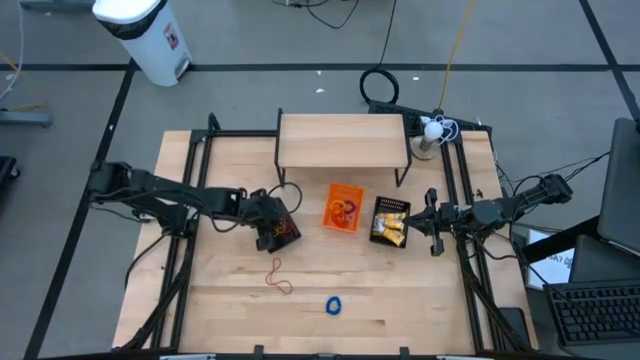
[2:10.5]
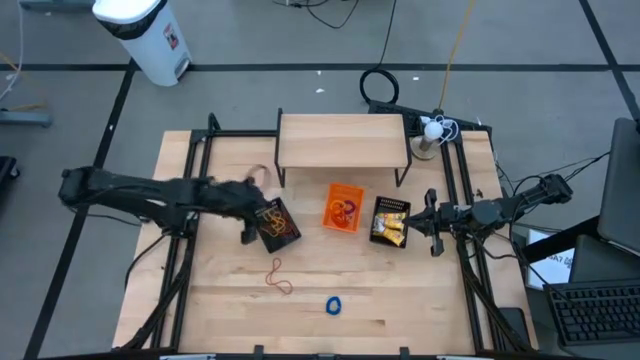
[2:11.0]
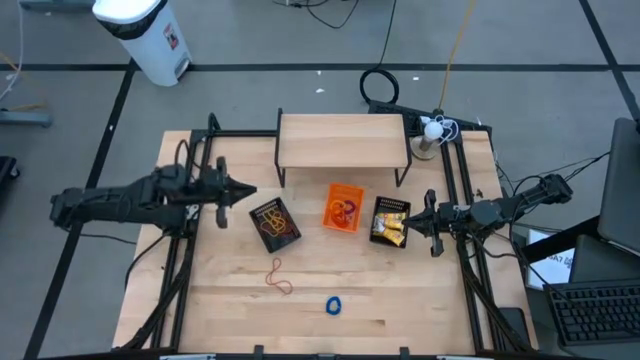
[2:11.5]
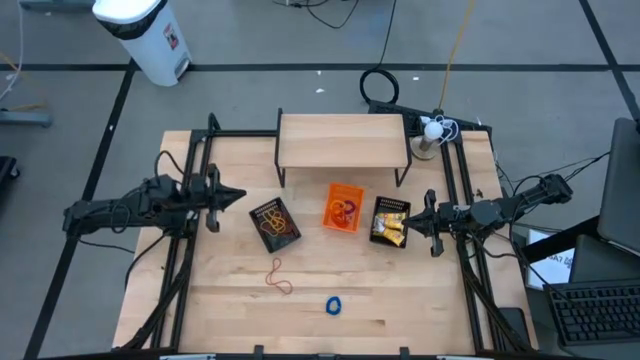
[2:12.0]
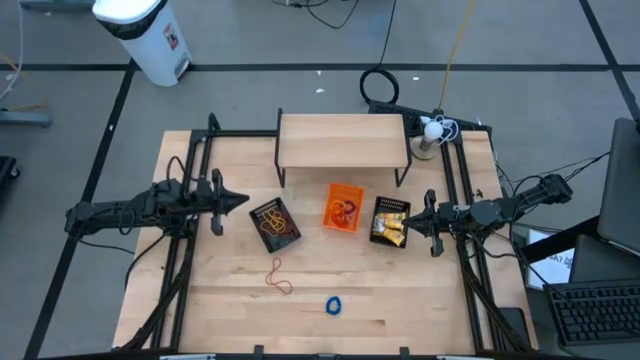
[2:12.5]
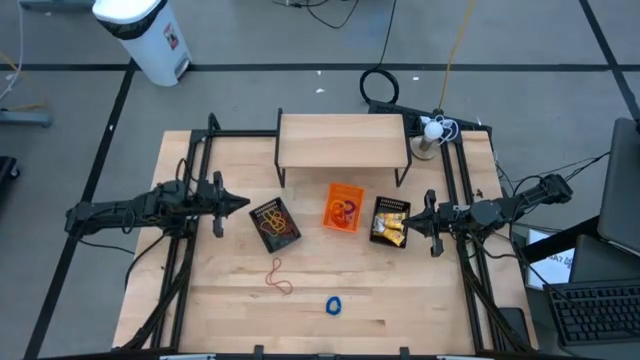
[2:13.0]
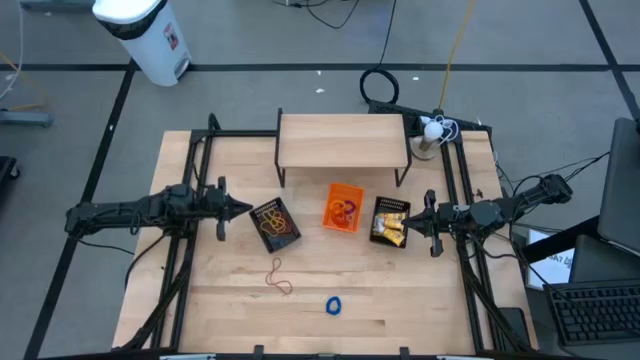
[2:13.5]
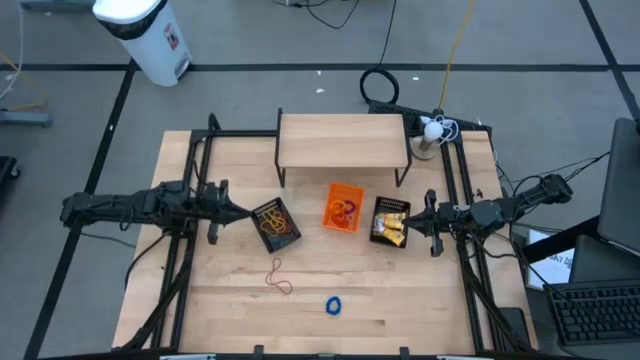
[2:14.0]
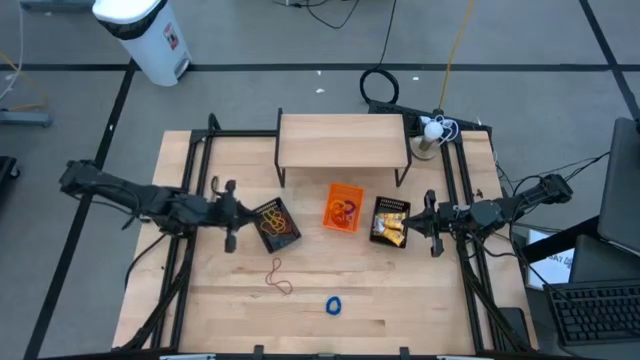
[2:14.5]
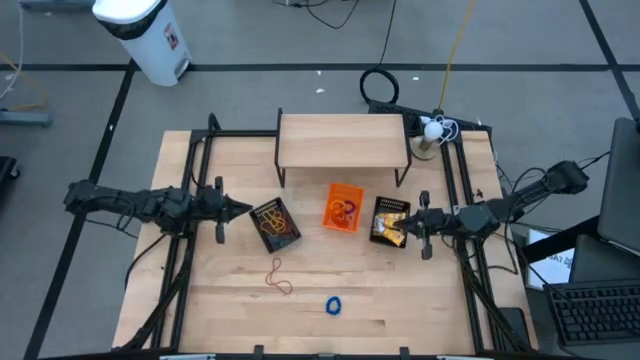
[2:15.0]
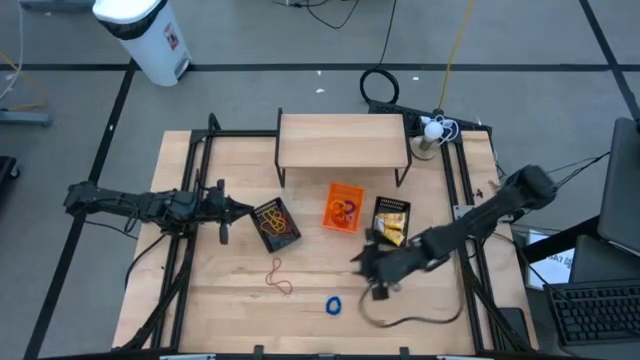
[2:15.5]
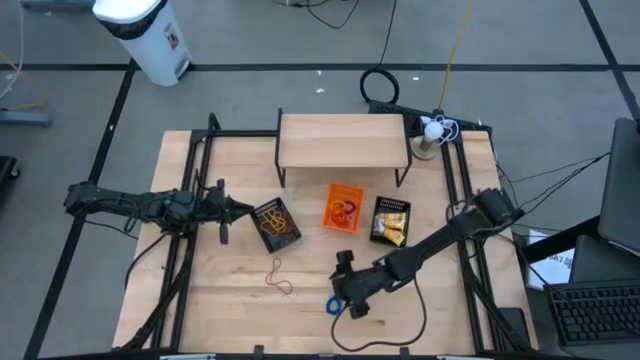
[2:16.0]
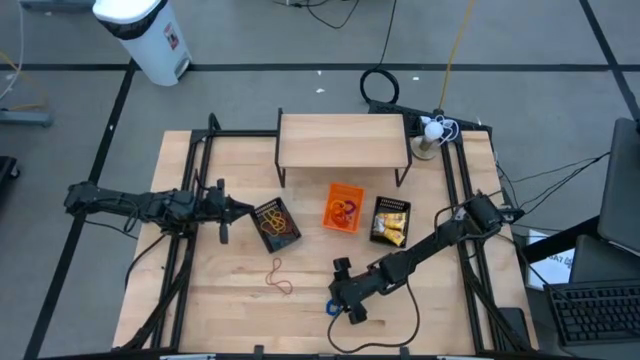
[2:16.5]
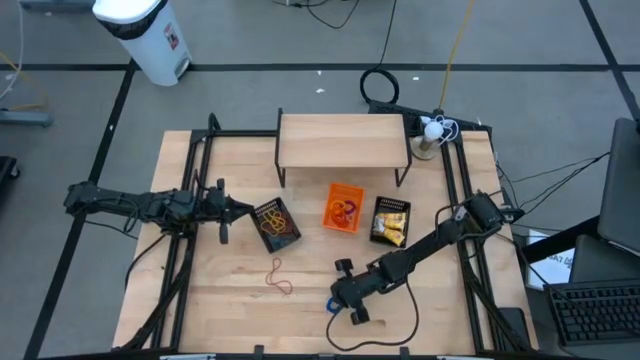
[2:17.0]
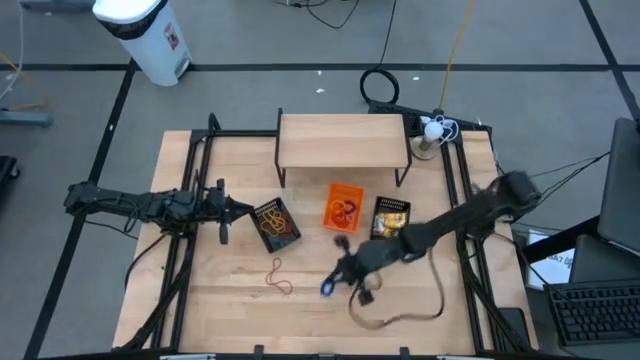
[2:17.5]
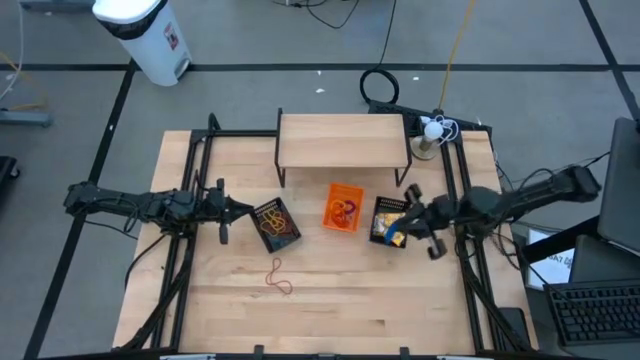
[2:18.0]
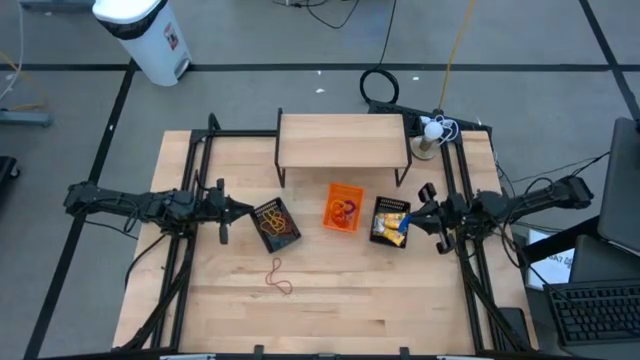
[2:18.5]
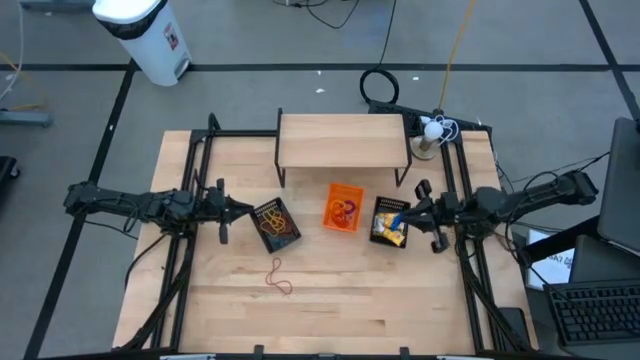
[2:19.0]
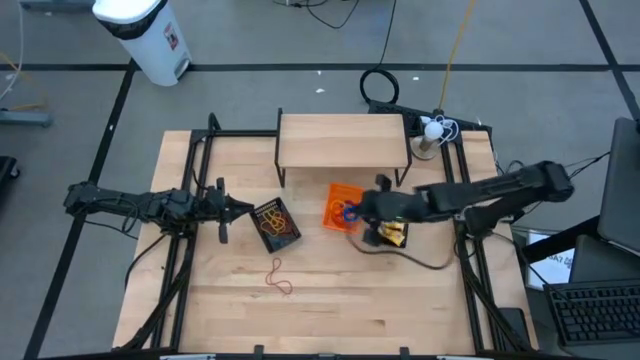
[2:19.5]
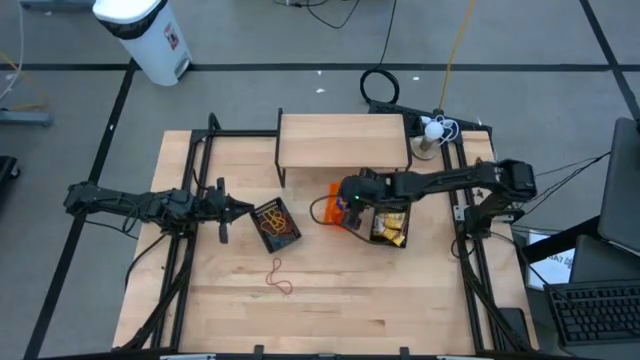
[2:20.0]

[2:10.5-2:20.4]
Task: Pick & Place Office Desk Supplies
Put the blue spring keychain into the orange bin

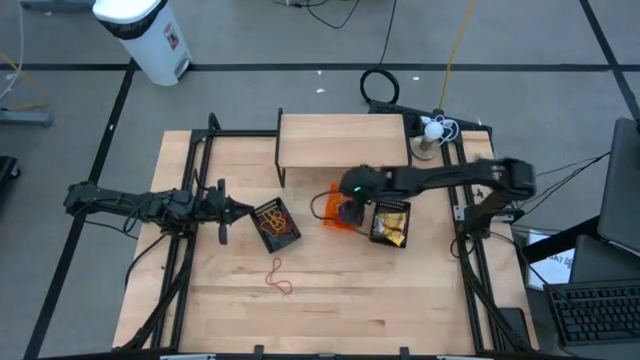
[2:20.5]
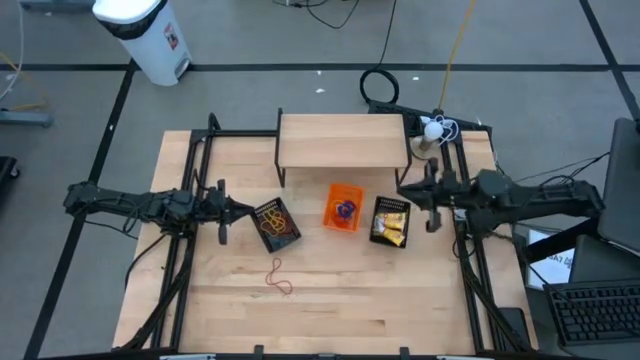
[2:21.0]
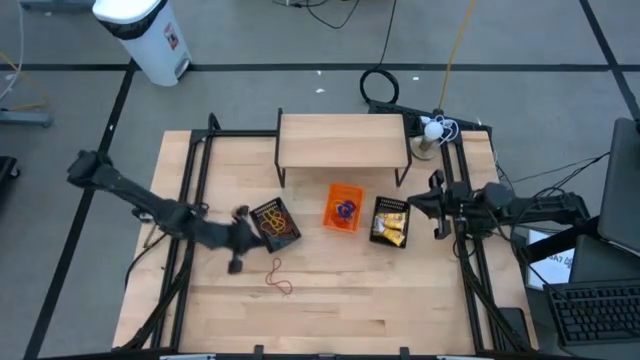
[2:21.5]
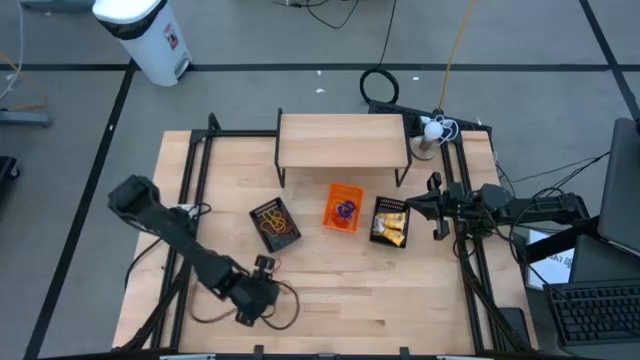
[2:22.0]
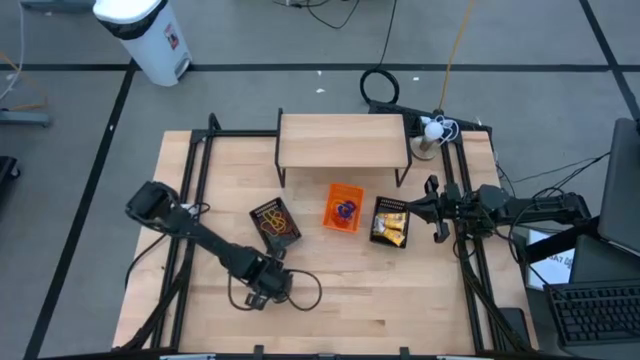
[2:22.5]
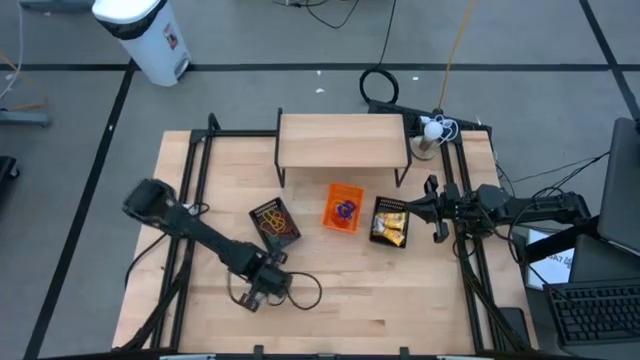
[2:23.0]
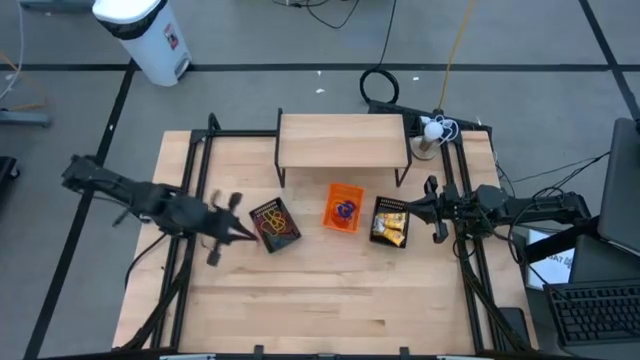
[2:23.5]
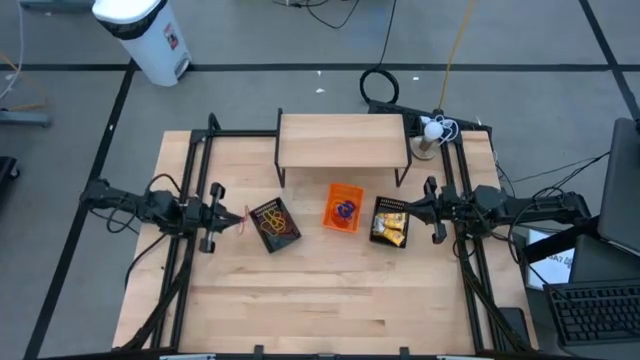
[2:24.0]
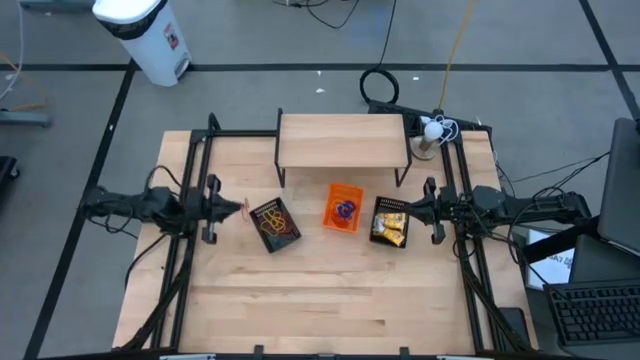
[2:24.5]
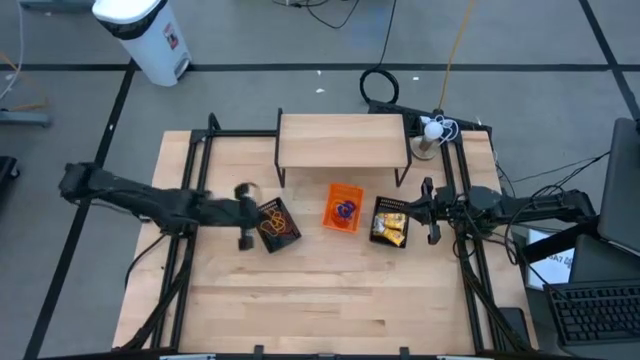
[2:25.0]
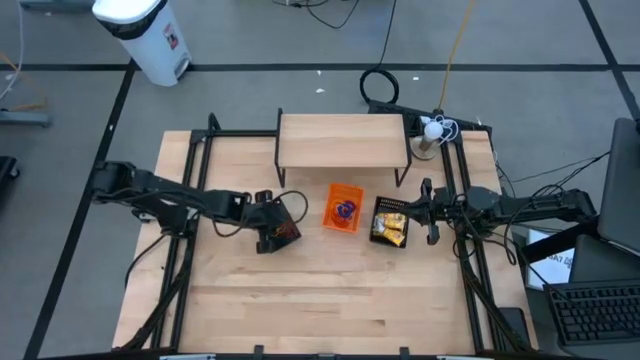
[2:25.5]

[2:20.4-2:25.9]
Put the red rubber band into the left black bin

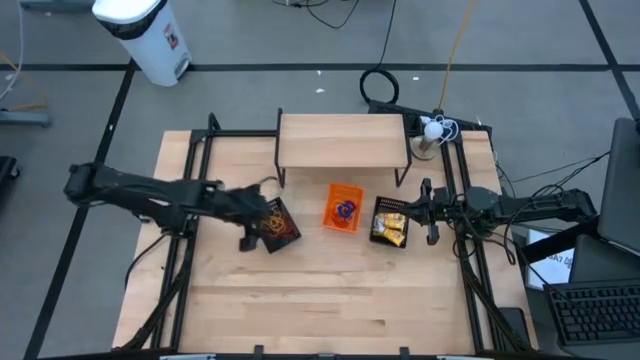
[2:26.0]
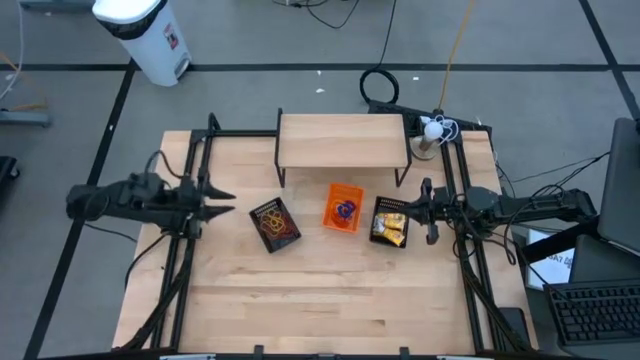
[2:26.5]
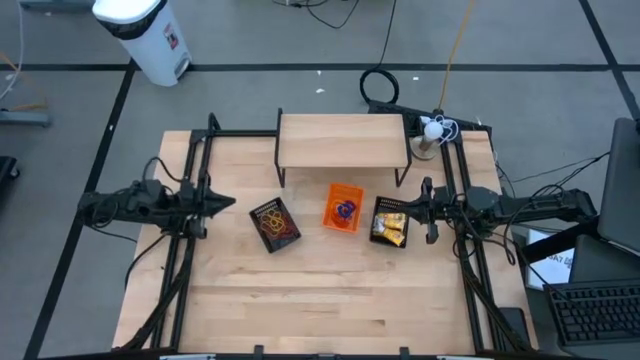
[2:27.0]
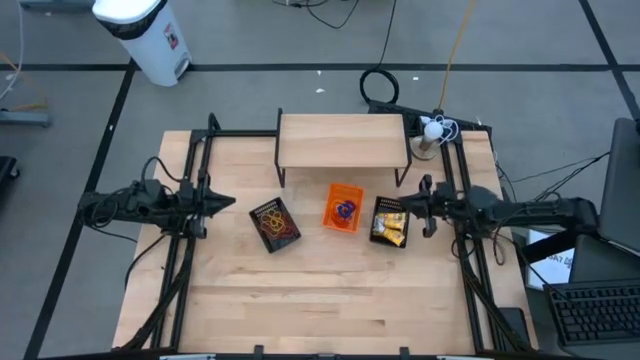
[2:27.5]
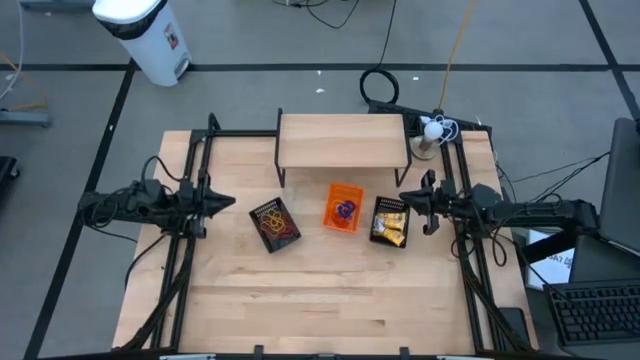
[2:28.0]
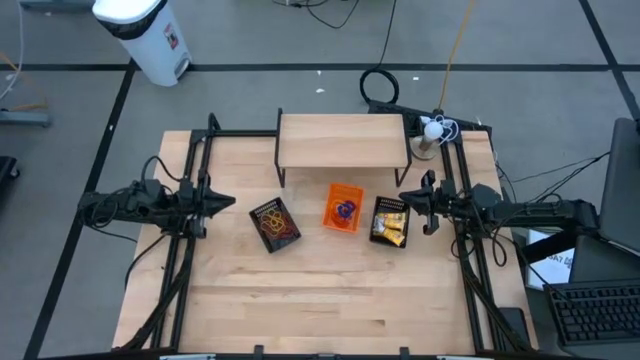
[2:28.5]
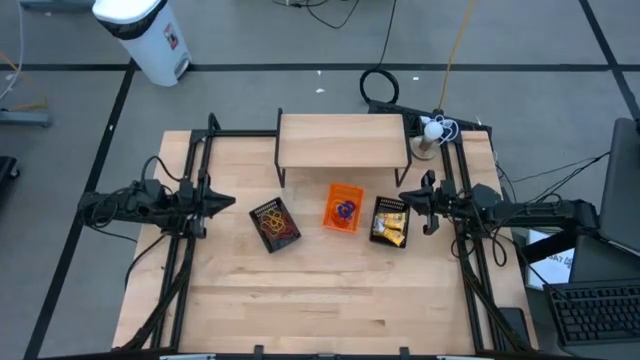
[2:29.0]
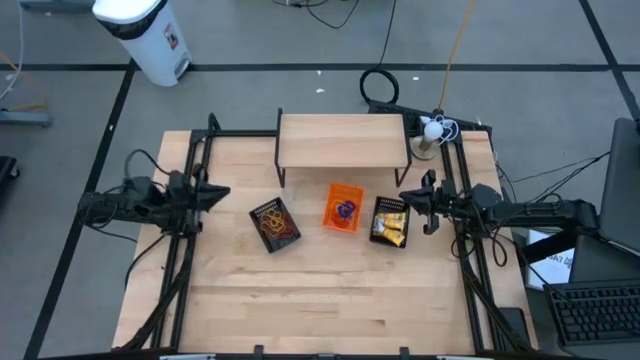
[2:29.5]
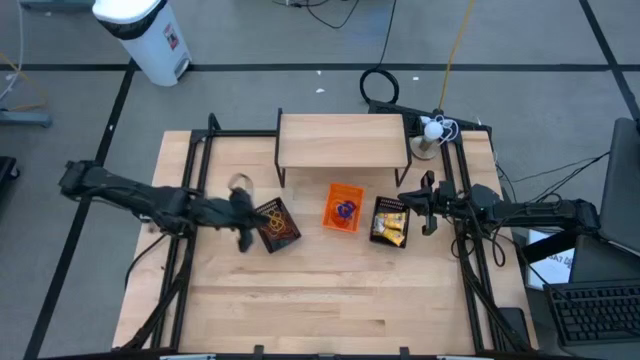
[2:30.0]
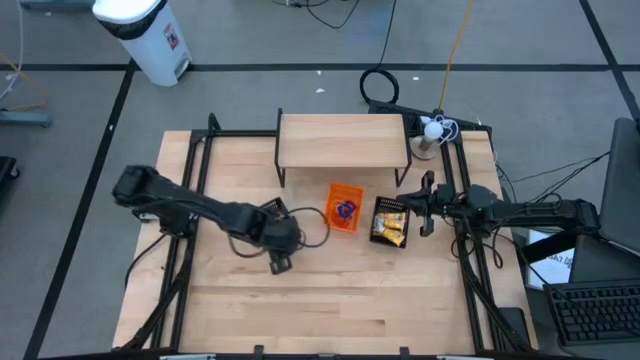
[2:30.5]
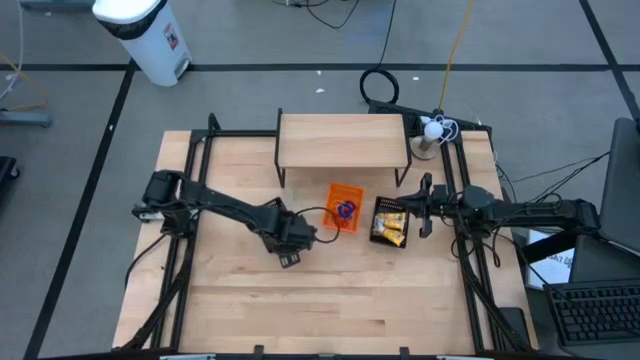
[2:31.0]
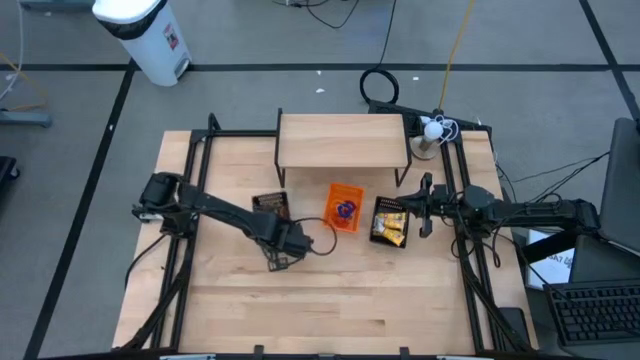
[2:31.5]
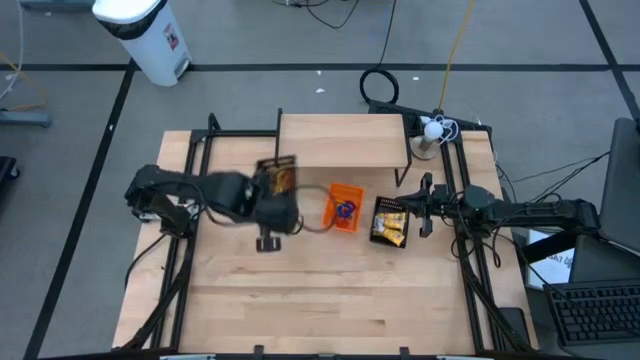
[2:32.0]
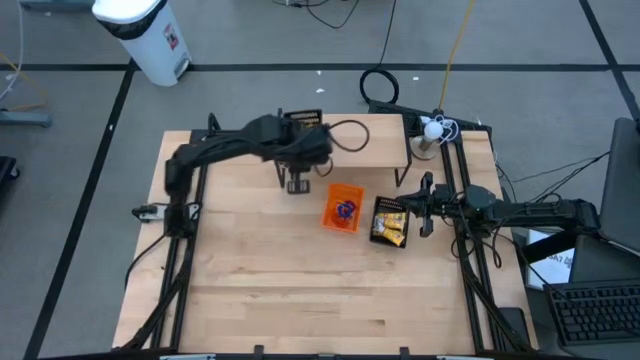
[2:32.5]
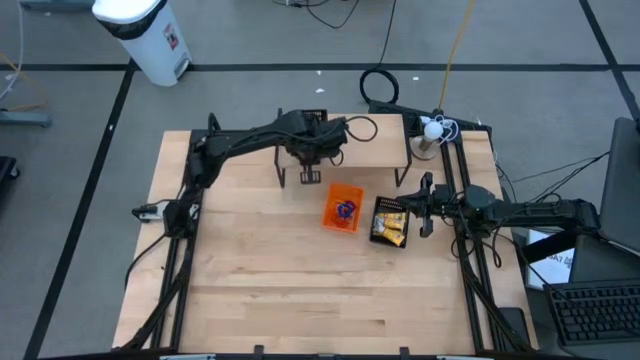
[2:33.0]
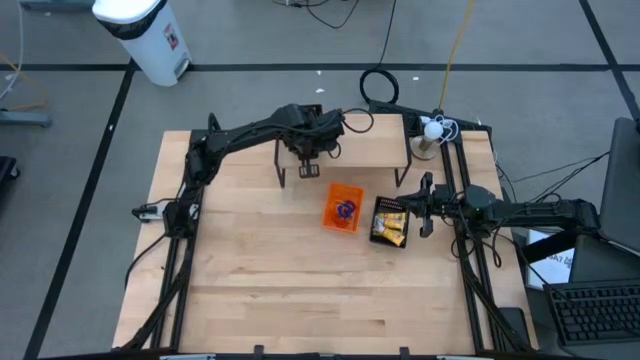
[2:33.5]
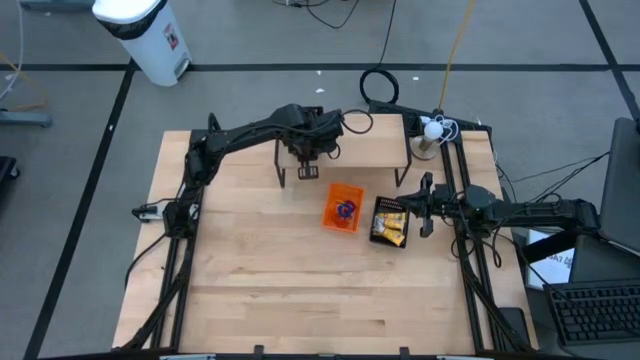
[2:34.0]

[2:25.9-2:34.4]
Put the left black bin with rubber bands on the shelf
